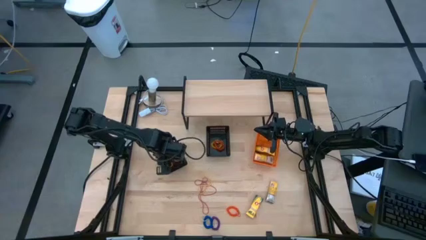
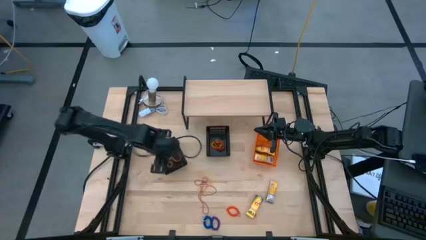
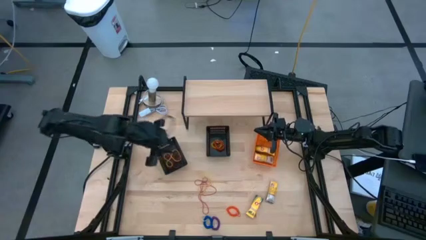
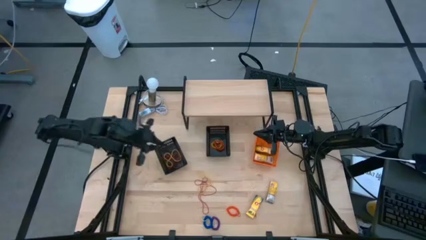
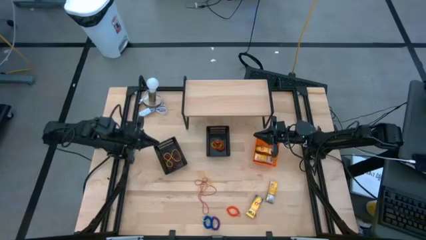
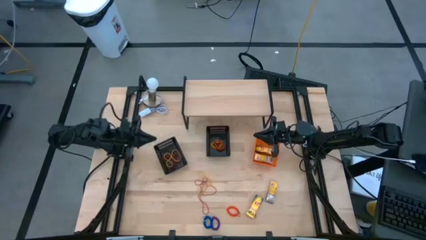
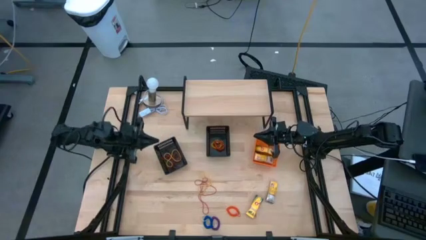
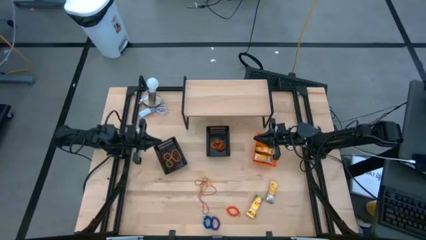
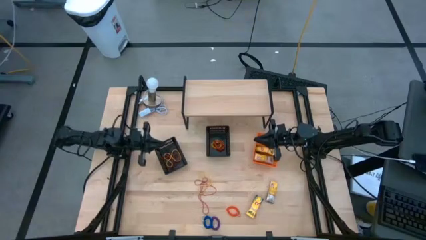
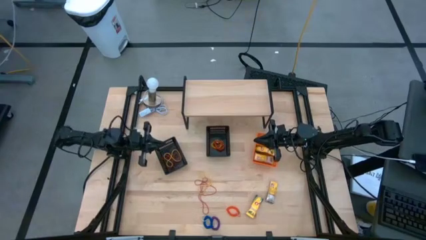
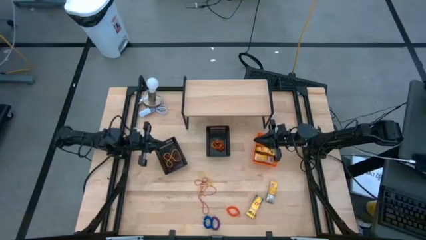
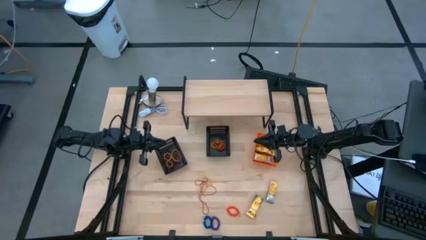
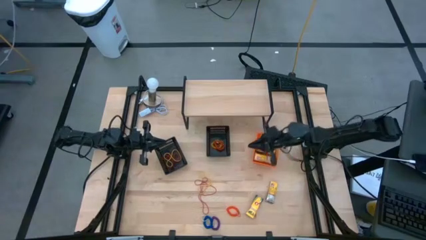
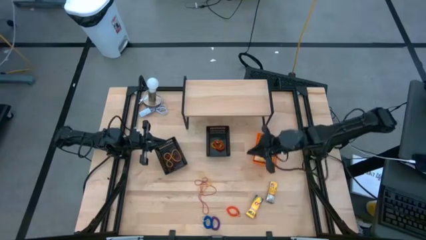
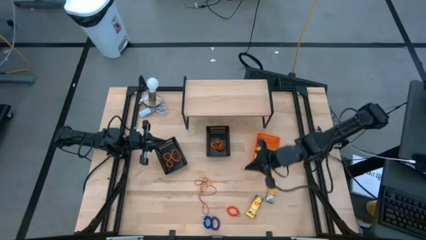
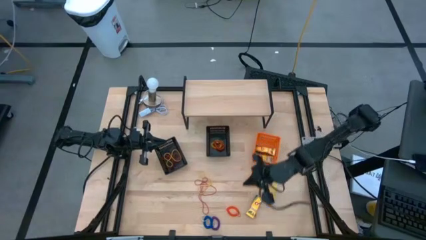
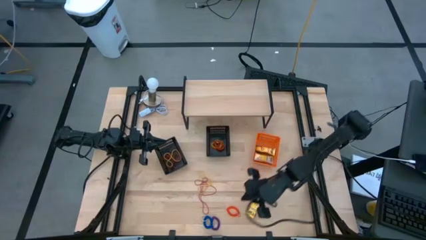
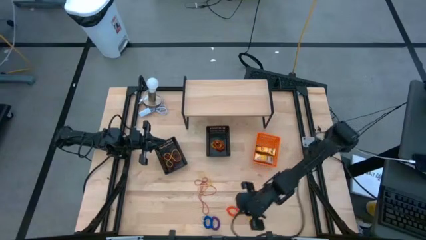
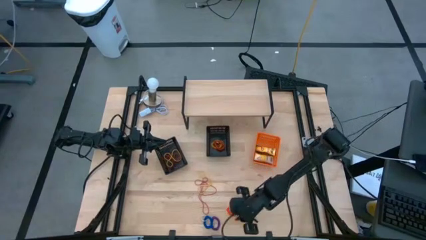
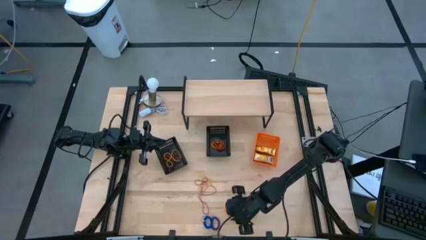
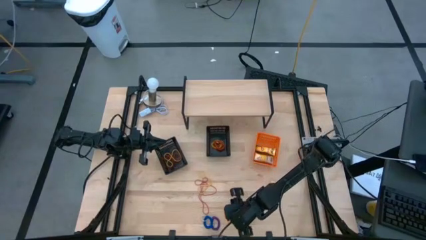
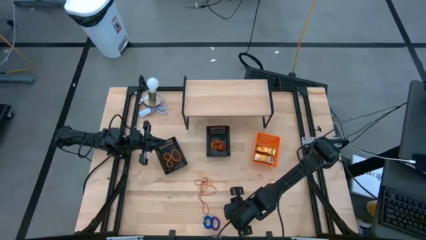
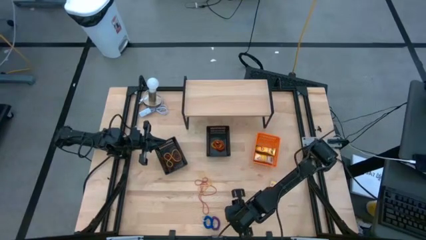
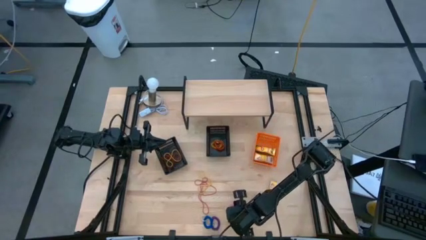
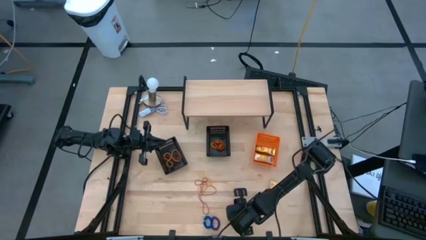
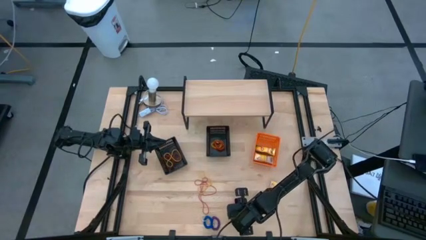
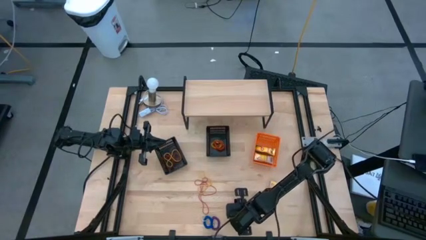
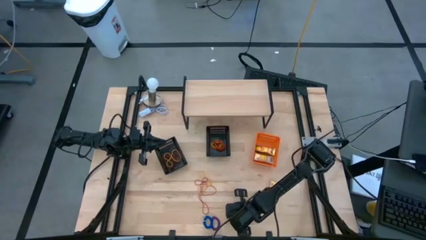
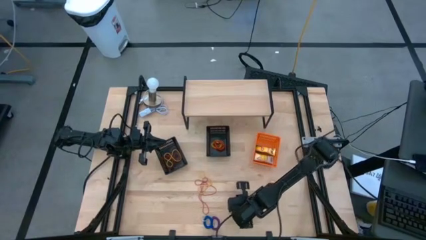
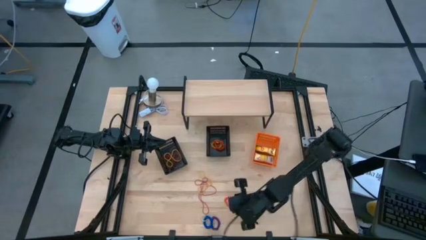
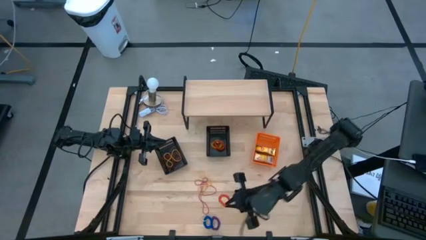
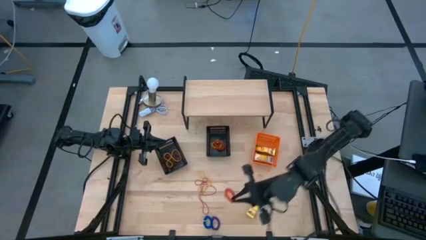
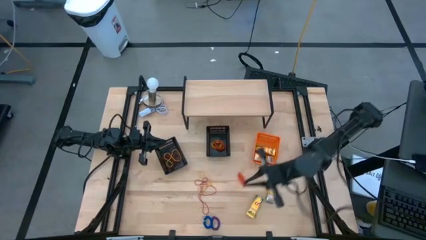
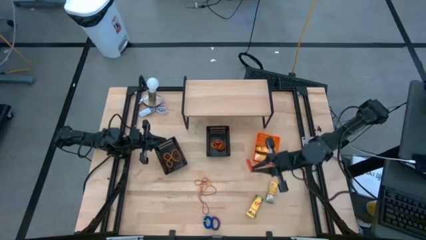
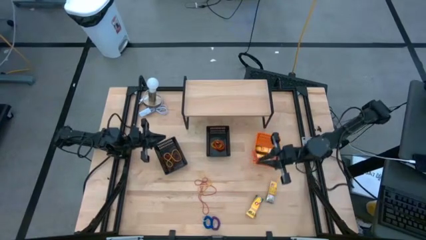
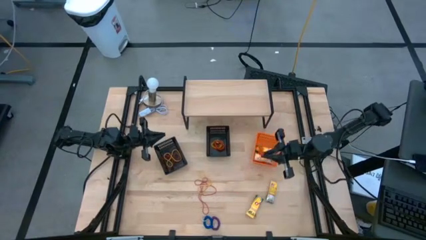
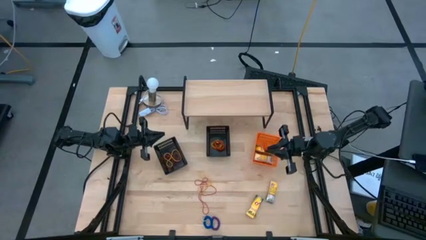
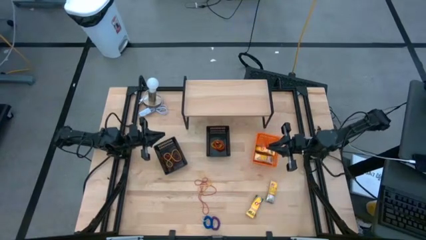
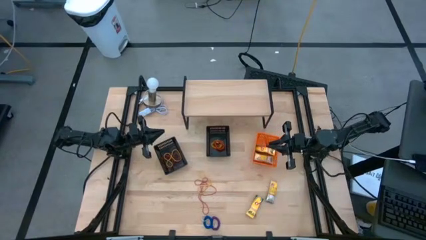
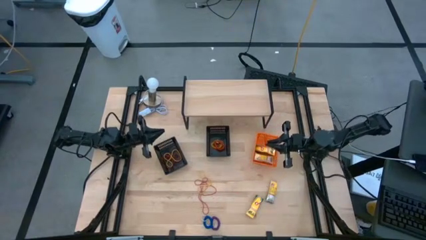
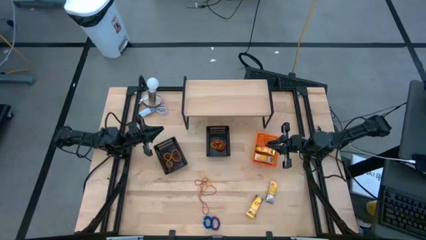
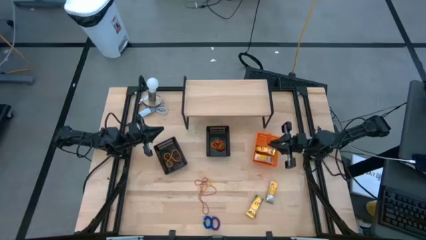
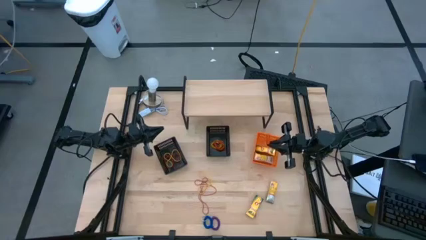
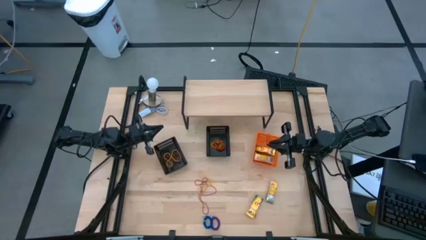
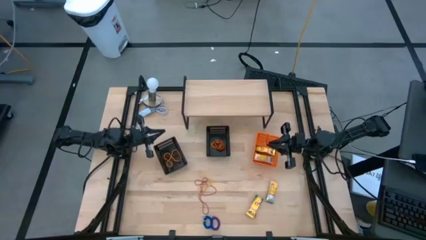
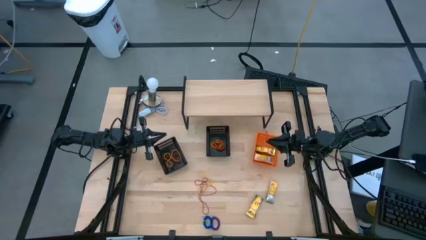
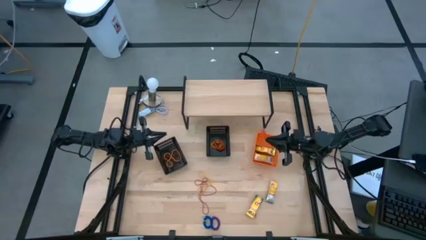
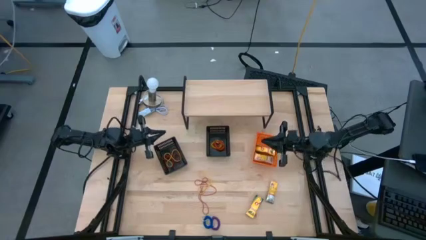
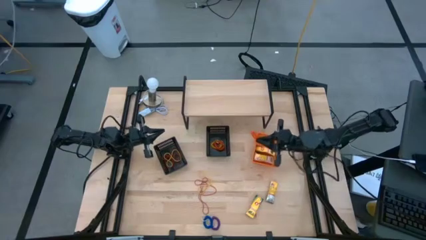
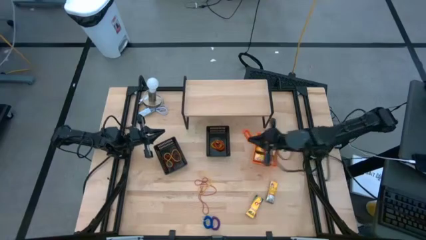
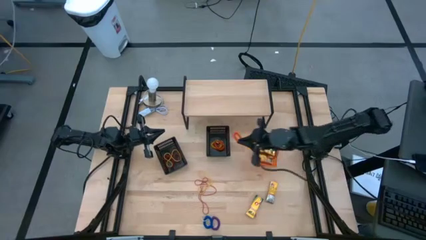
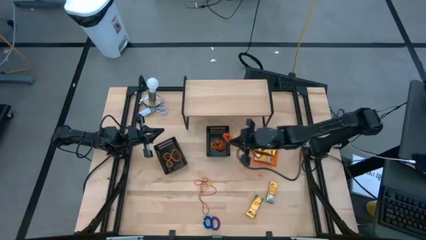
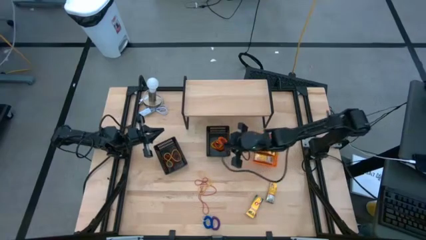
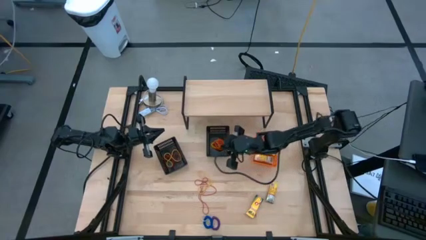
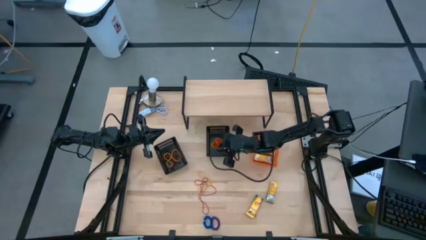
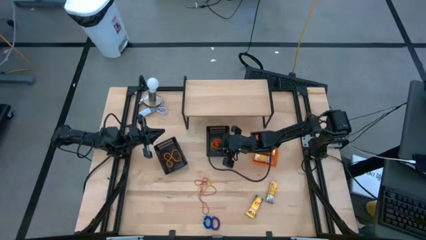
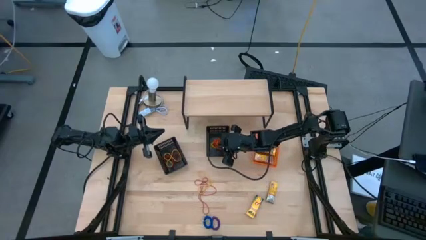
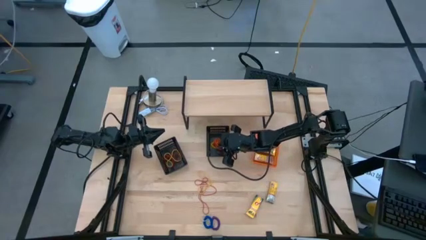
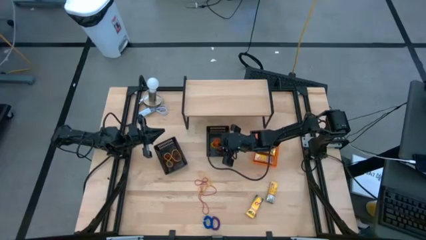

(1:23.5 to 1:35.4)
Task: Pick & Place Office Desk Supplies
Put the red spring keychain into right black basket
